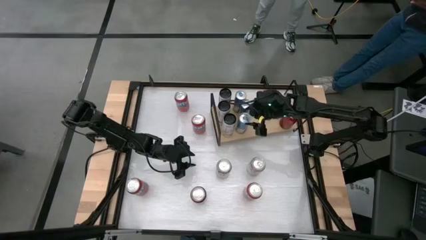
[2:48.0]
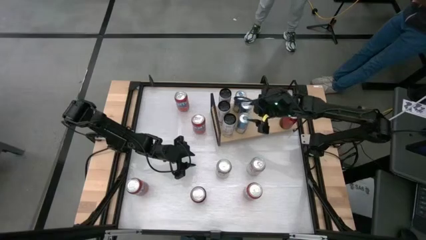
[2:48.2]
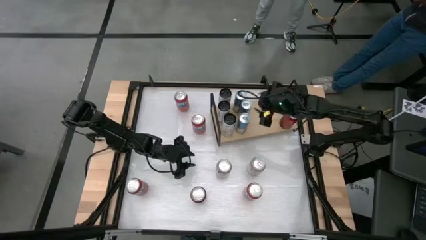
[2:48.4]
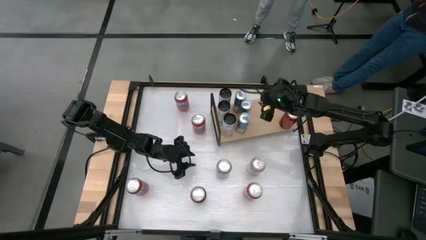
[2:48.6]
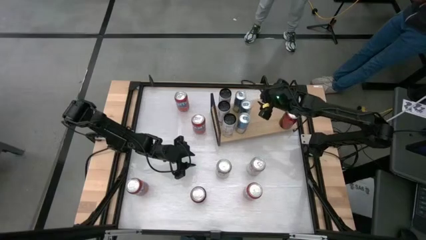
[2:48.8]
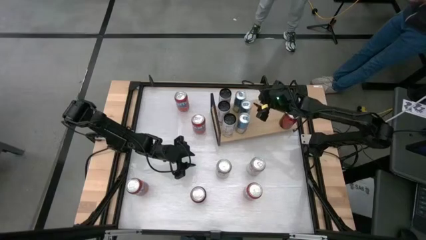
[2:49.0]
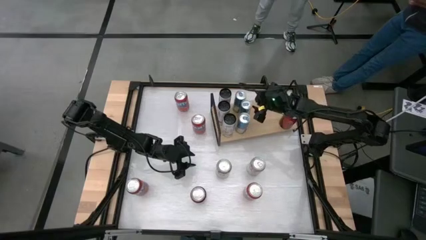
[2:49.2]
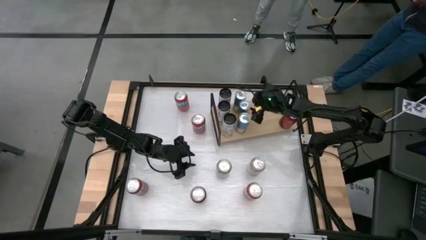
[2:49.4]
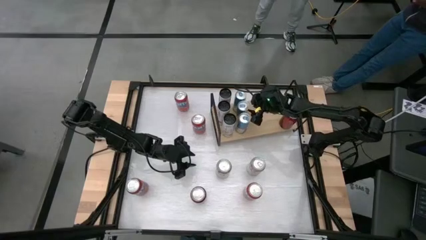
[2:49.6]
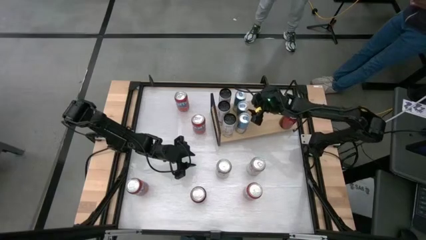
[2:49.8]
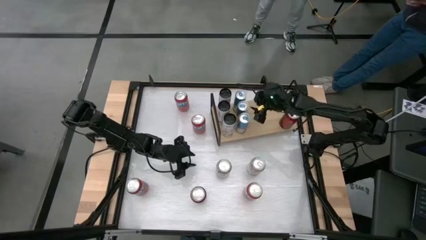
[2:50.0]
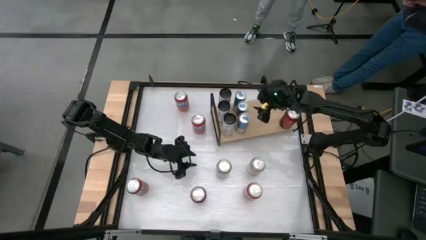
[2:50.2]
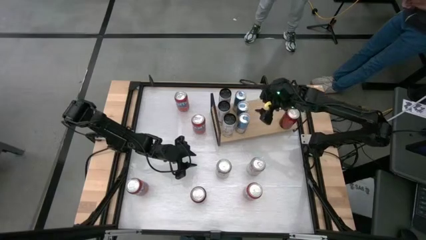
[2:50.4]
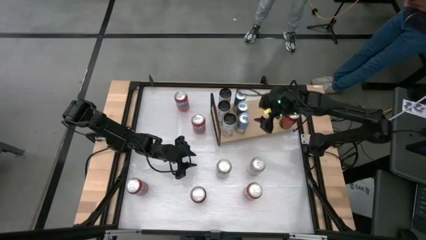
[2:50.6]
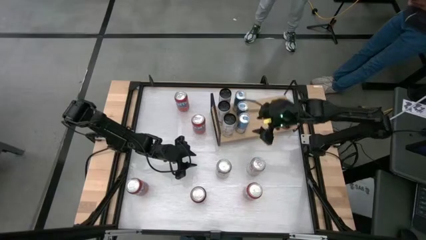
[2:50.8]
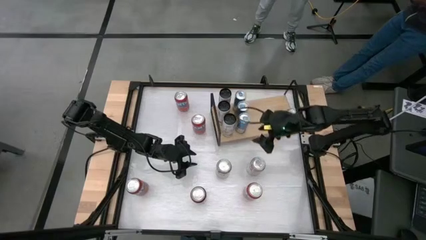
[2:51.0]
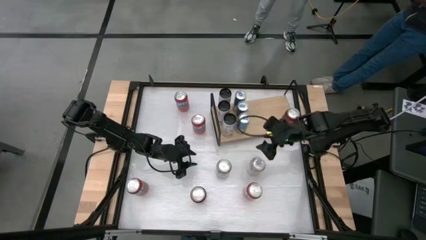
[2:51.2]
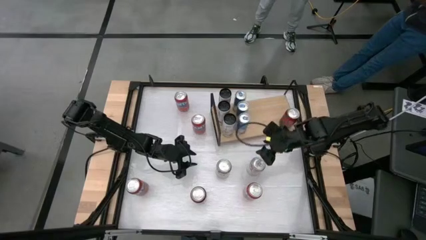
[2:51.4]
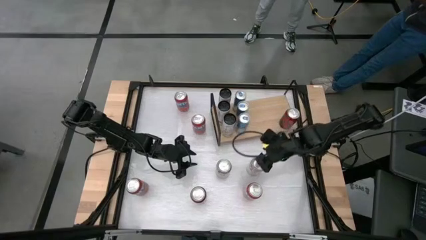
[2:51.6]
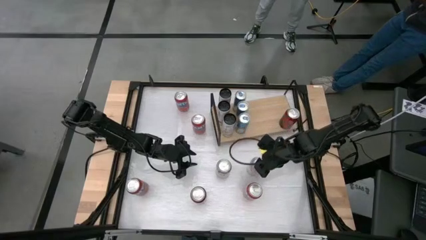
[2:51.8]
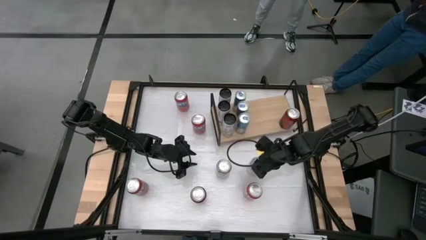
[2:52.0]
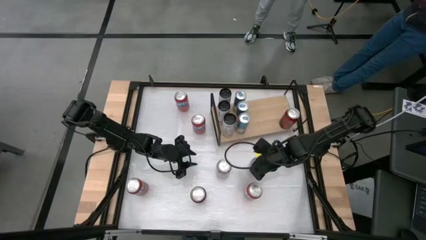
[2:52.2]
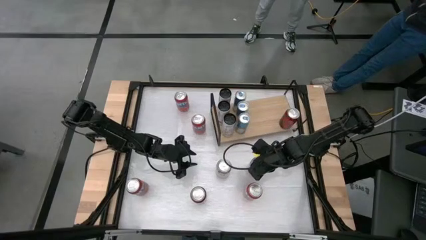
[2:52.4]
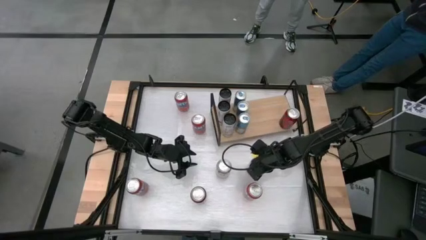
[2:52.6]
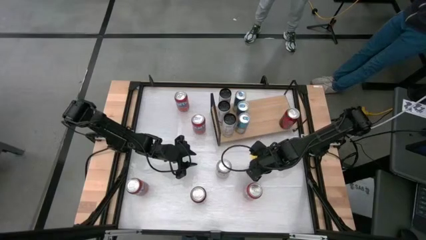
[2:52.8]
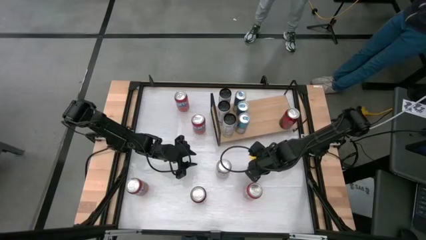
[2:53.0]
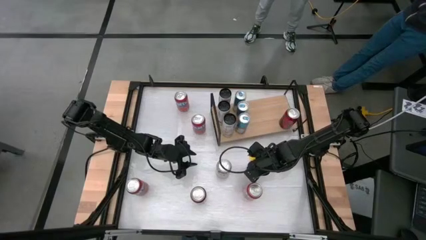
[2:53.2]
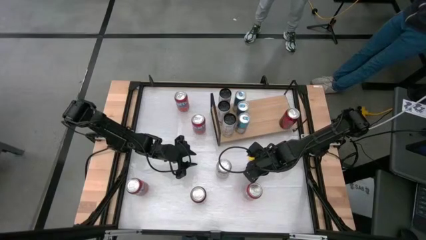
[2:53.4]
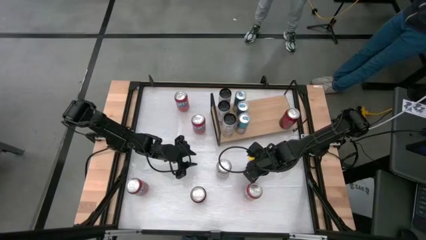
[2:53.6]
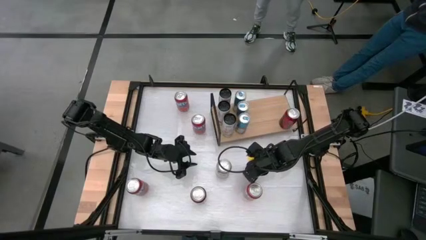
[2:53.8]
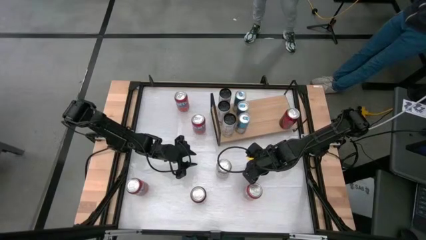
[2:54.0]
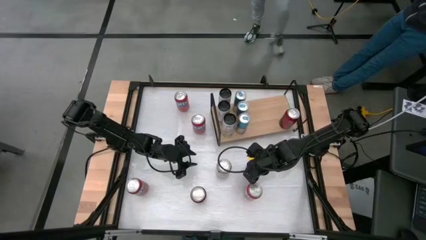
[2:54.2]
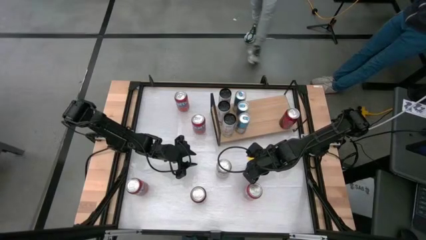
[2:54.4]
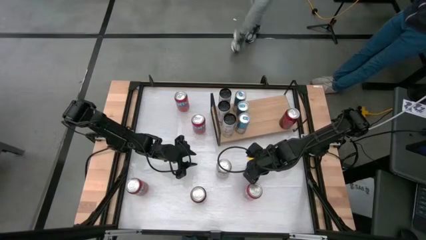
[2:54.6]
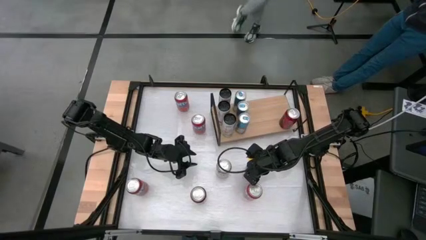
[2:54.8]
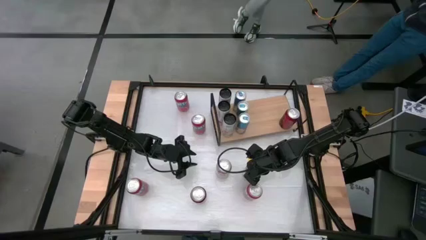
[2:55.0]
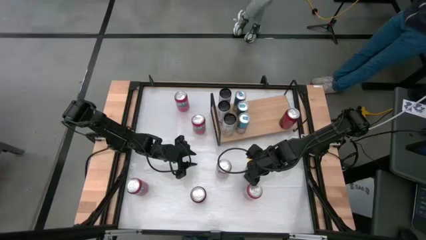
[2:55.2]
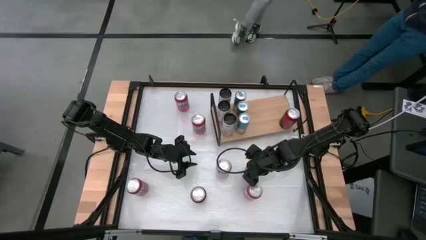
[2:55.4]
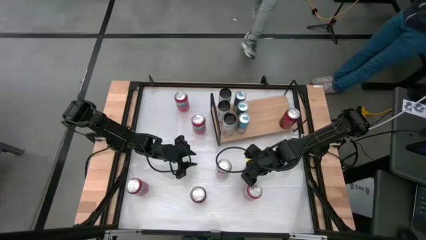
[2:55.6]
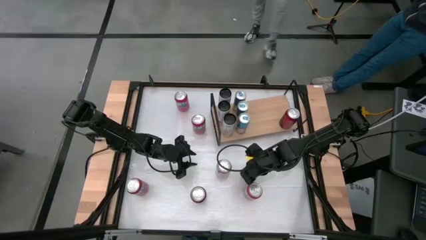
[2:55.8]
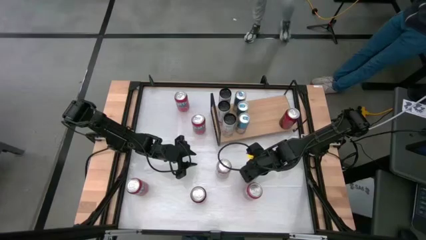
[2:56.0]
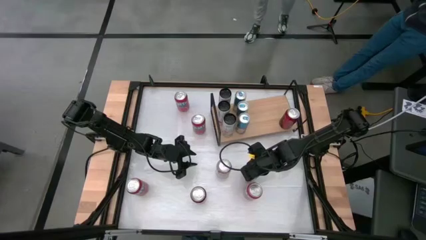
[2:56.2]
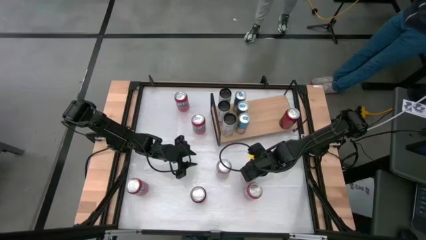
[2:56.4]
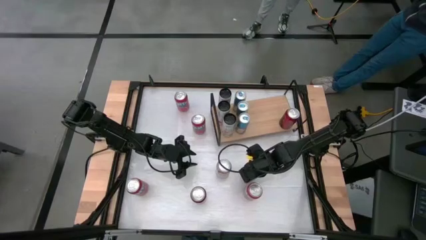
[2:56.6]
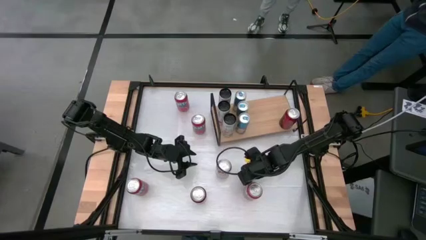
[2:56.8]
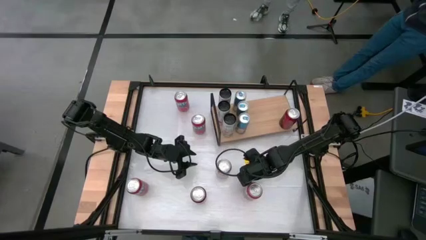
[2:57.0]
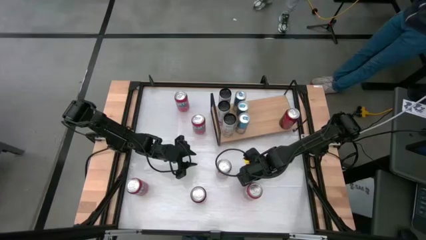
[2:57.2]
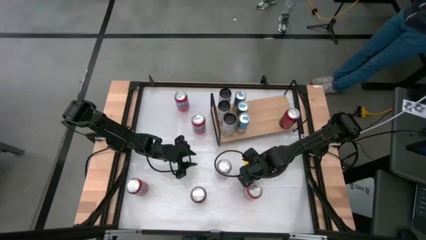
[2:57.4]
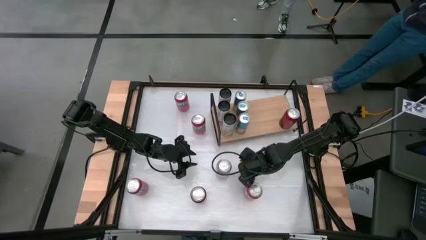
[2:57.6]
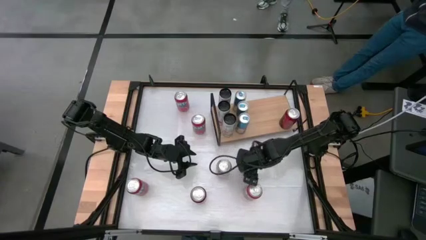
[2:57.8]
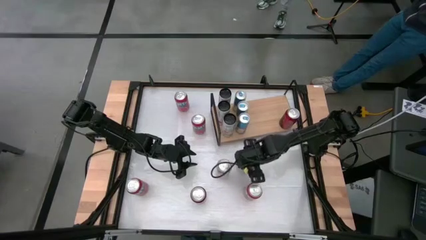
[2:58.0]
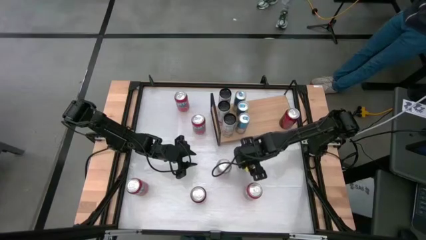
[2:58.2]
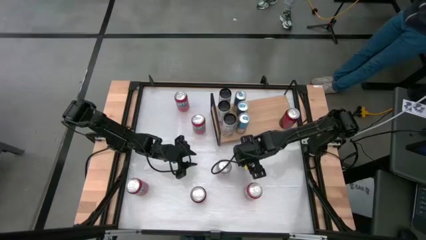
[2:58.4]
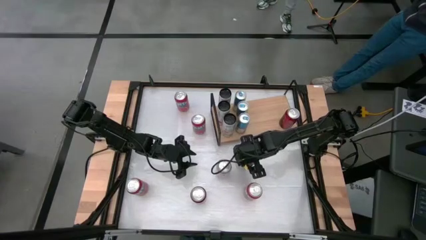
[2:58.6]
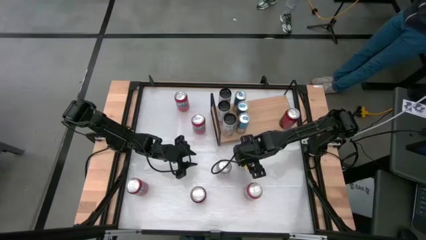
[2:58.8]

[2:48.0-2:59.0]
Task: Place canned beverage on shelf
Put the right silver soda can on the shelf

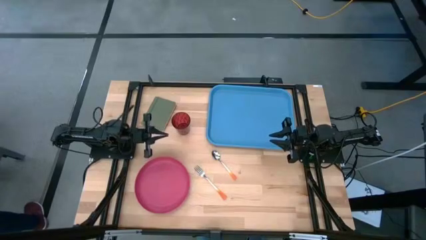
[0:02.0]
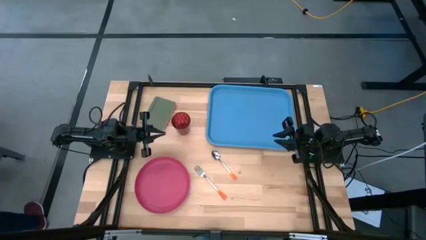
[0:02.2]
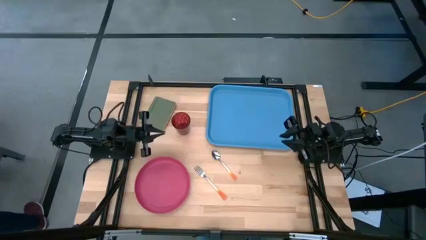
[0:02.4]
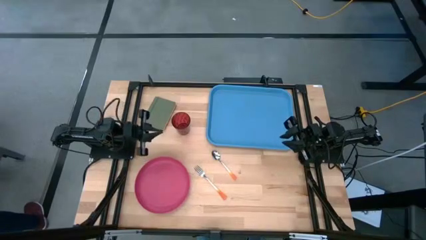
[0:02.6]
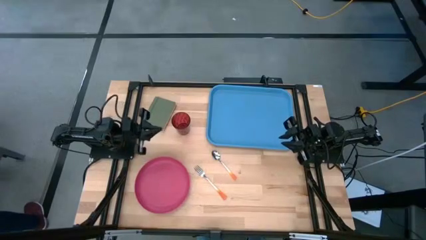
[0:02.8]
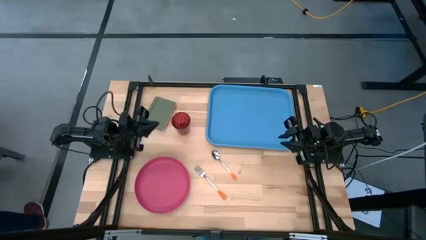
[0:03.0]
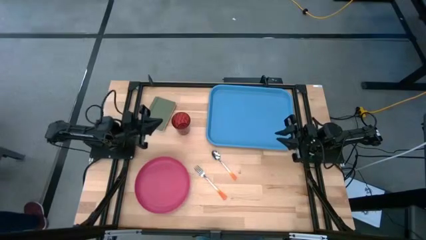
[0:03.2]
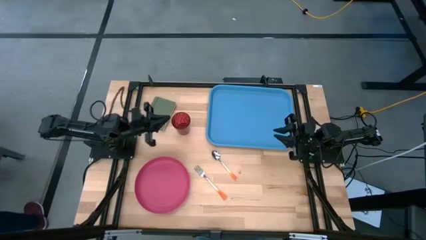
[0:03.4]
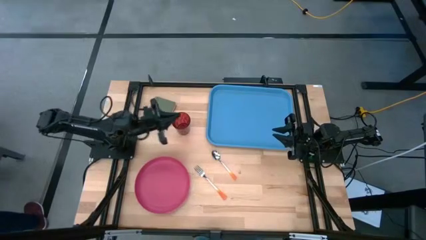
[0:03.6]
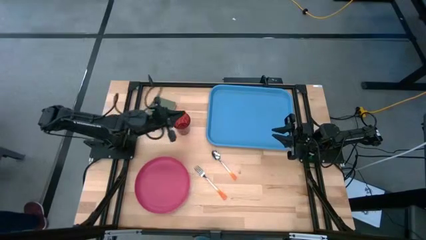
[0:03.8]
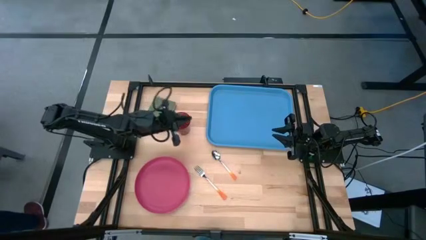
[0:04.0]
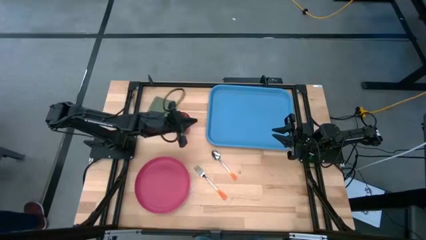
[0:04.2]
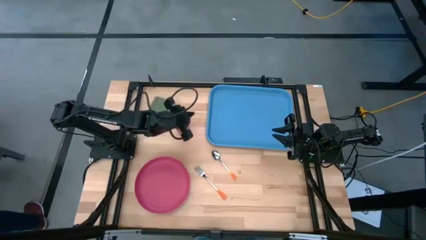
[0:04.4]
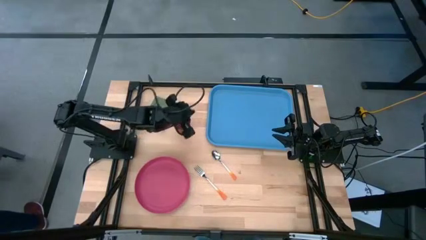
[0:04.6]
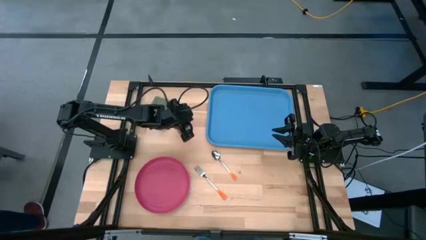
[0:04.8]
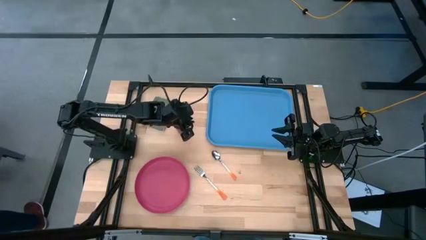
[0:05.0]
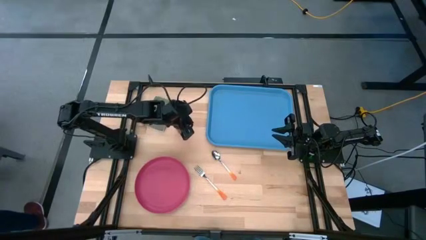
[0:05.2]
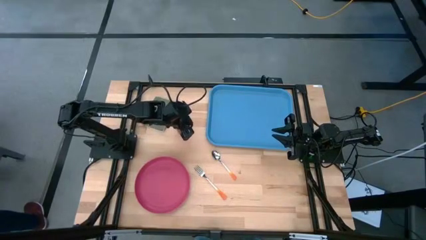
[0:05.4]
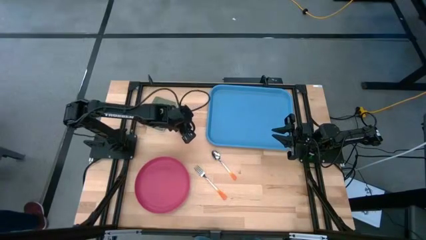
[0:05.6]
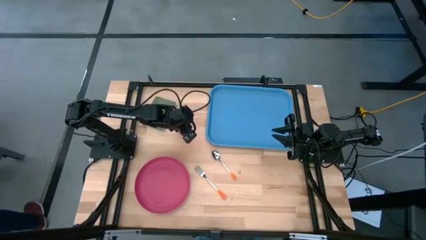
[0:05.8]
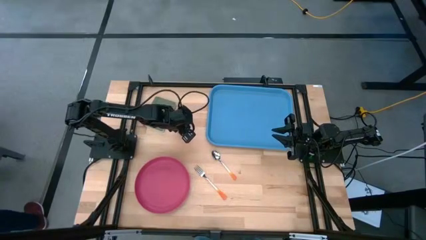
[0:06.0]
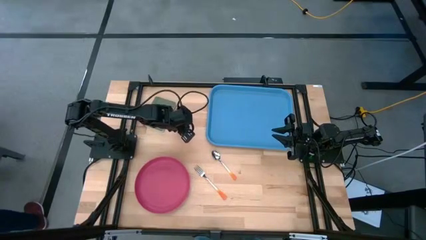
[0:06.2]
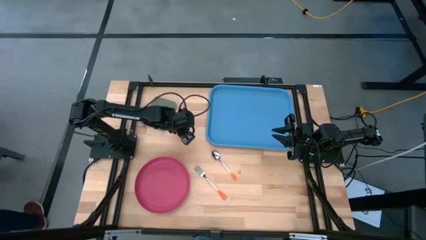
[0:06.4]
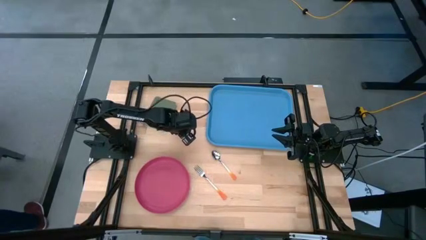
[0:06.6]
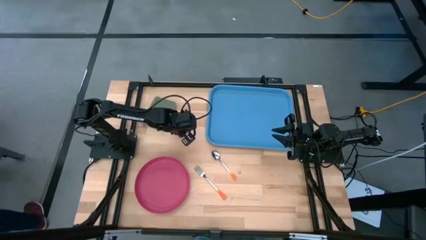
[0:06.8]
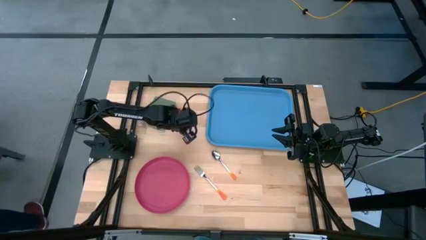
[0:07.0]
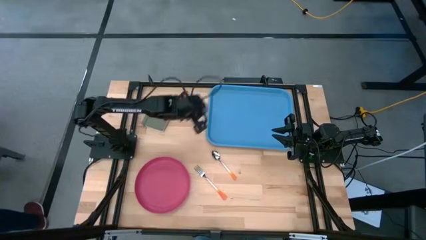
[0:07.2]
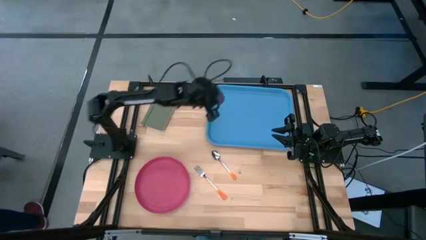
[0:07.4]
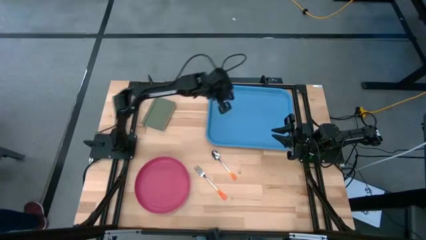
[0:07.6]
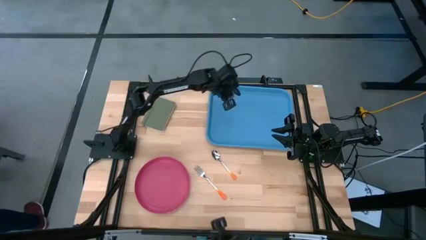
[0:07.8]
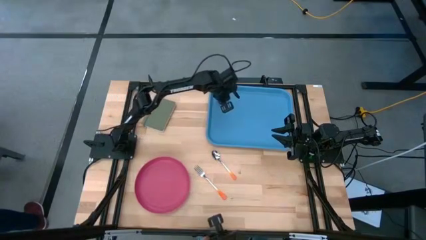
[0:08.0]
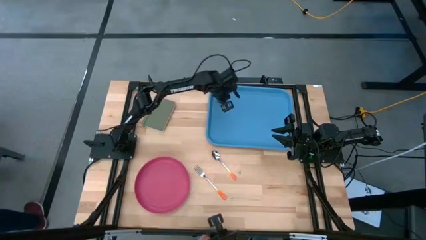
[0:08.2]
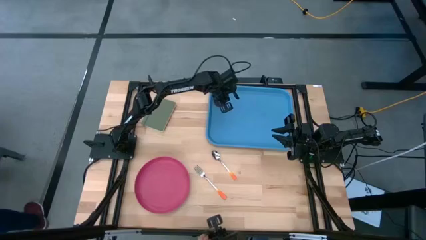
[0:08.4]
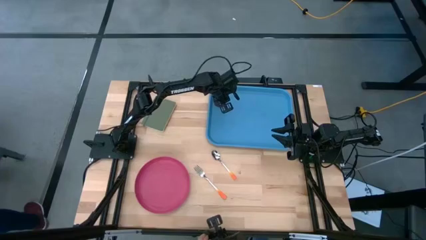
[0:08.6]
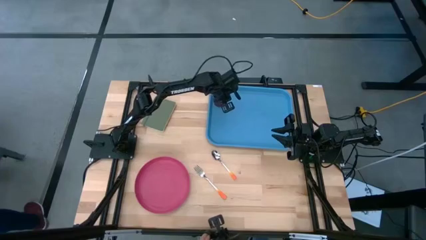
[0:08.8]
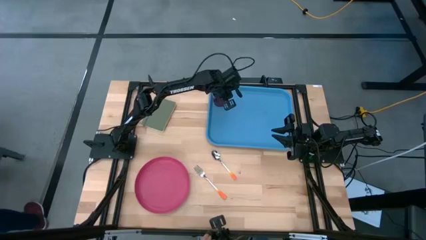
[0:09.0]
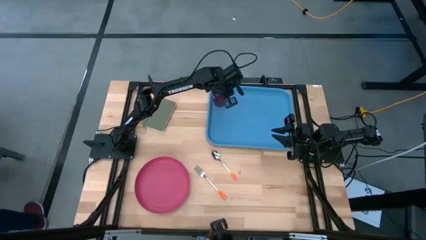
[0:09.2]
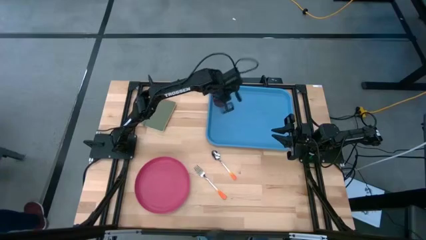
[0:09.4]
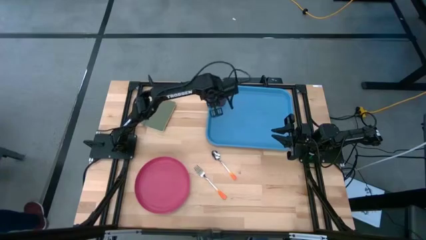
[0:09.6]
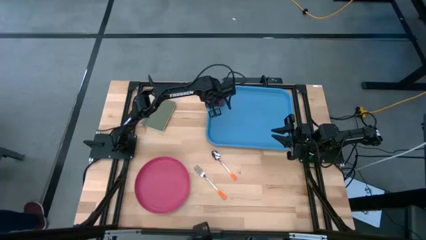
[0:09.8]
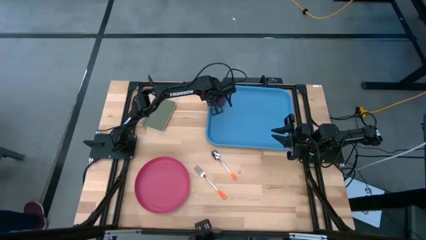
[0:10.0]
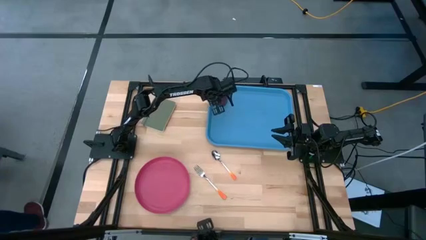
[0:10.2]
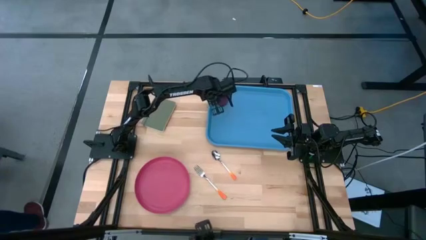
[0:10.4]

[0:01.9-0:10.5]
Task: Pick and place plate/cup/fork/spoon on tray
Put the red cup on the blue tray
